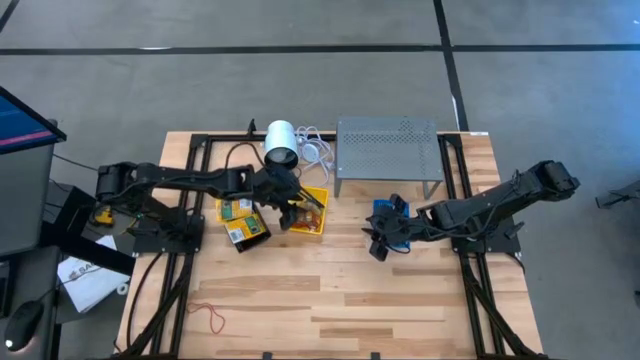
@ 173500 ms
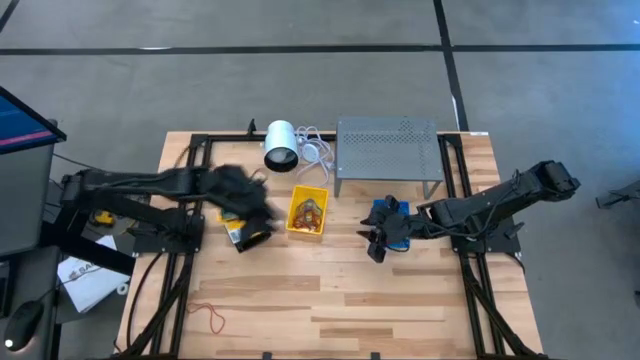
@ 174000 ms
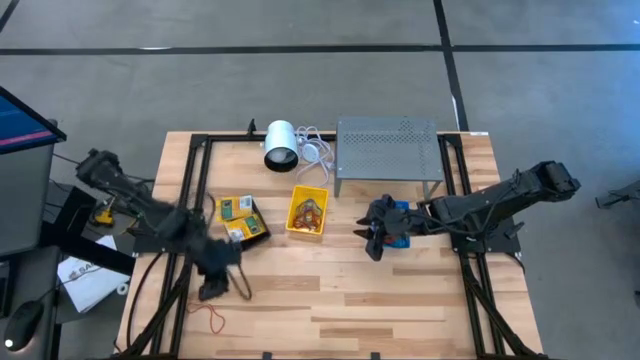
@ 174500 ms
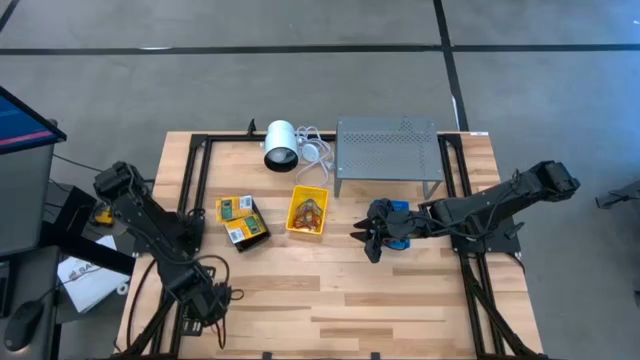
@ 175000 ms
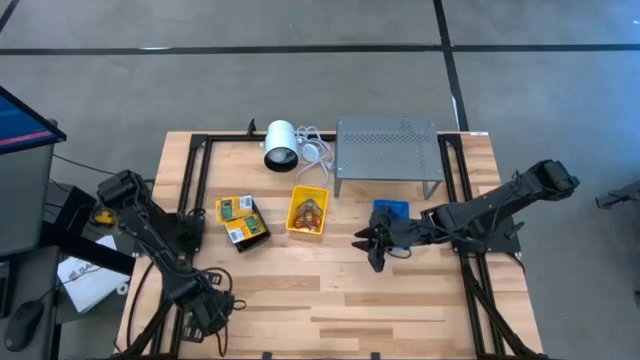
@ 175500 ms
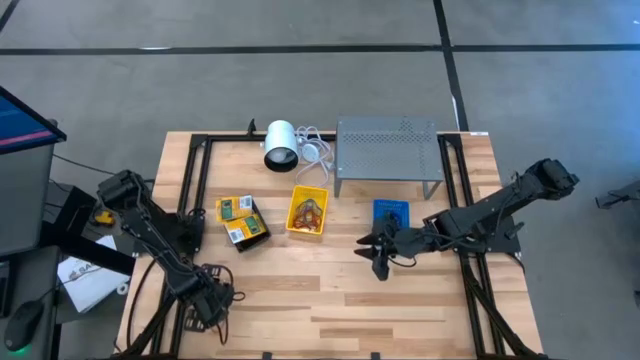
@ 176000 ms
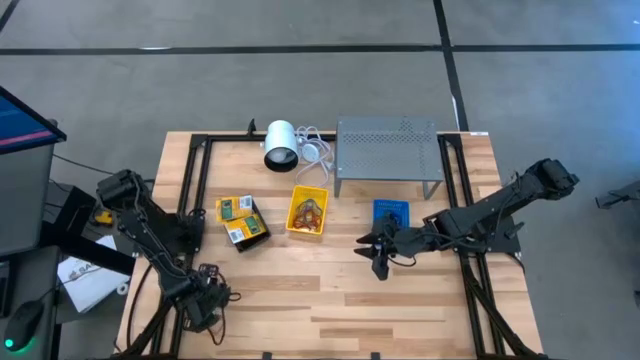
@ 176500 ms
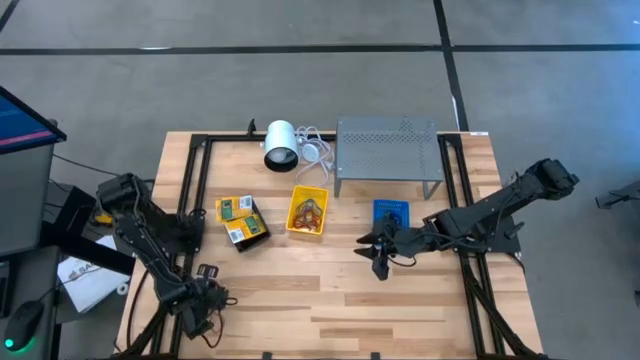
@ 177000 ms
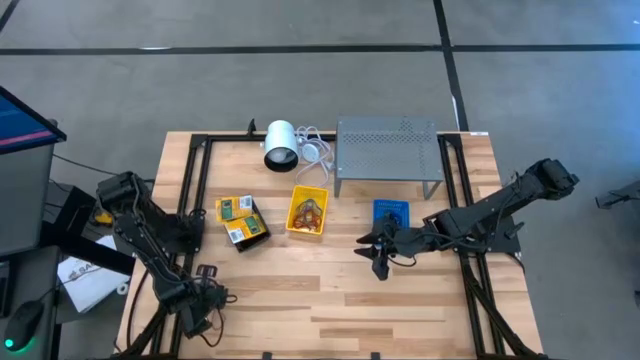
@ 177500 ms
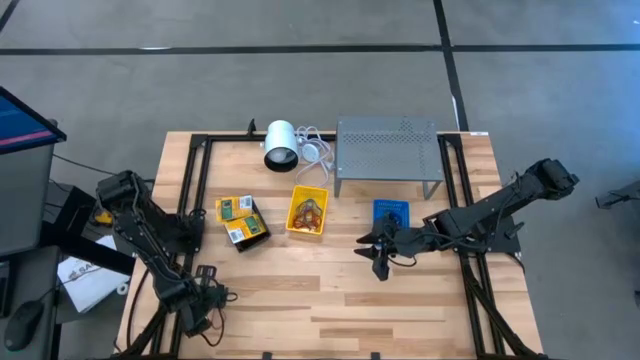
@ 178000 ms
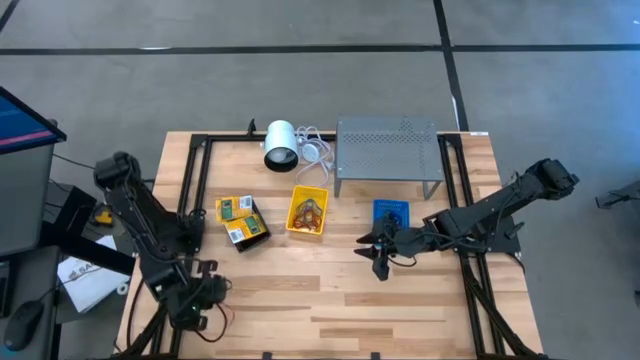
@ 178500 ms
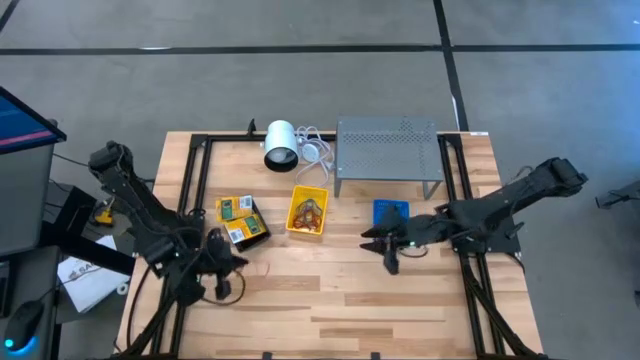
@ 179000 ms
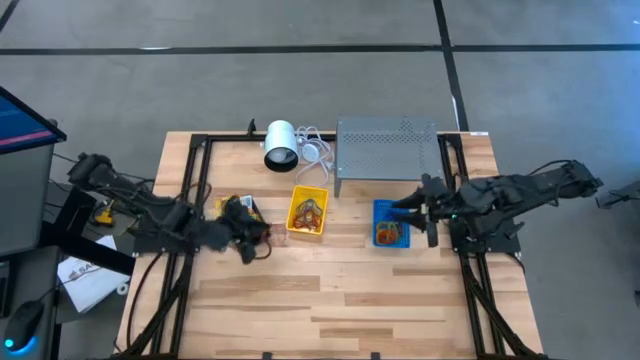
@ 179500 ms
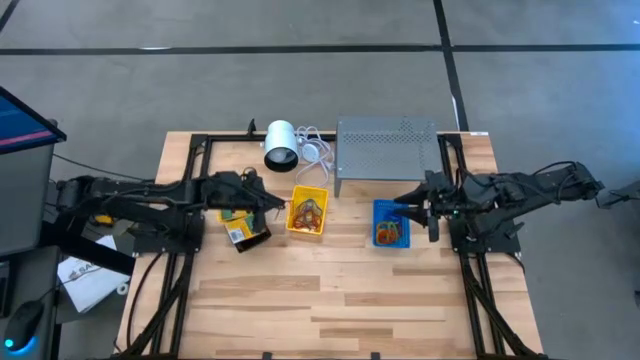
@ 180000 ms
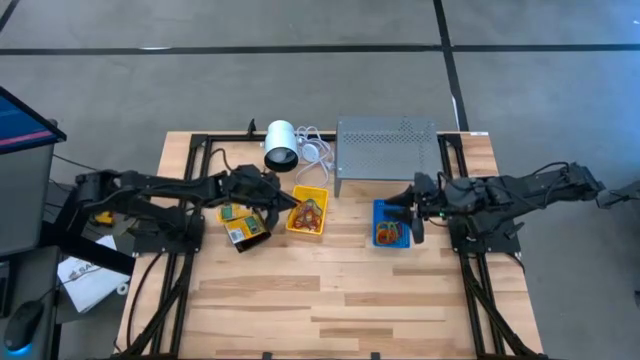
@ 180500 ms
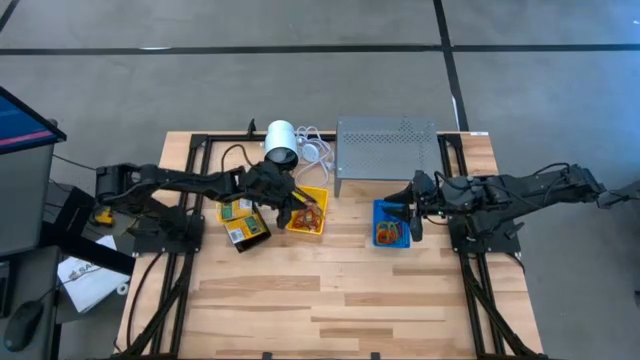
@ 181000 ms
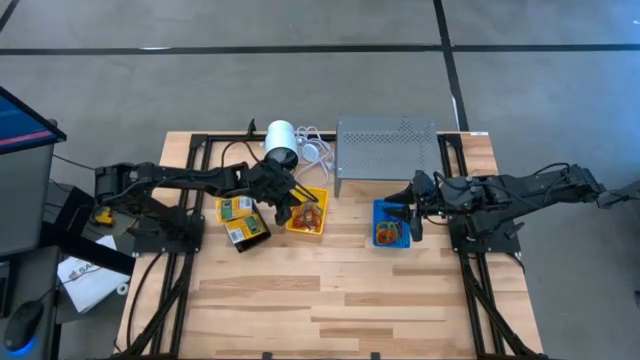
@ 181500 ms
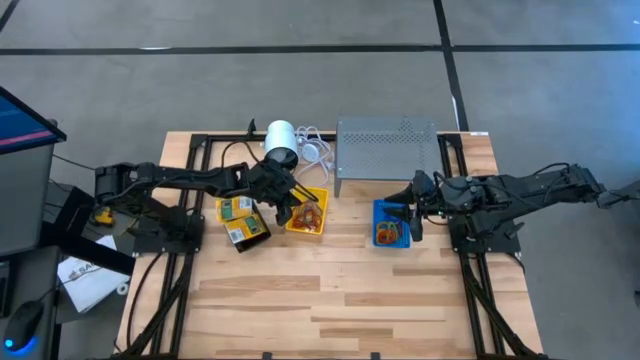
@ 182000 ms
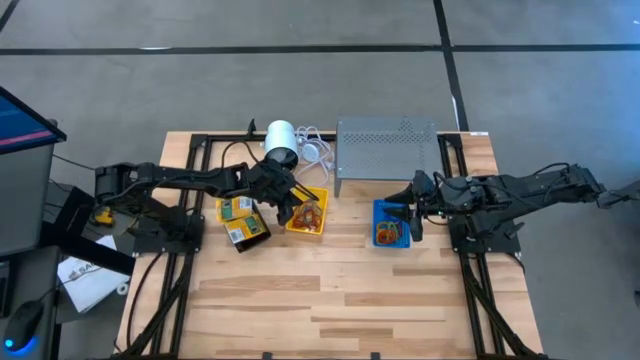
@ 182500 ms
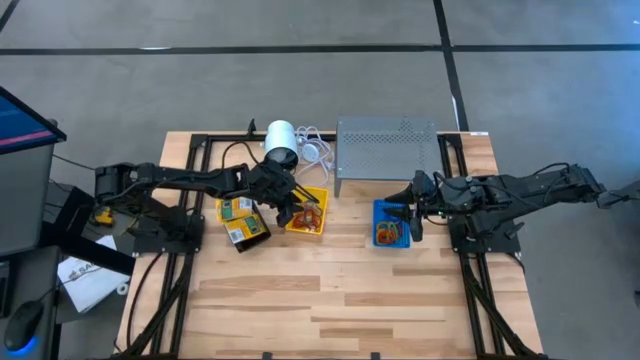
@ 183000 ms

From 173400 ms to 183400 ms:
Task: Pick & Place Office Desk Supplies
Put the red rubber band into the yellow basket

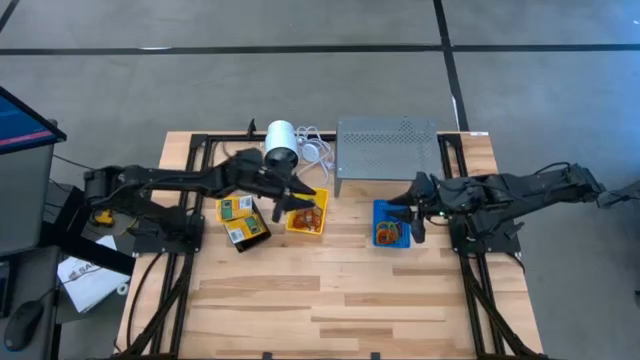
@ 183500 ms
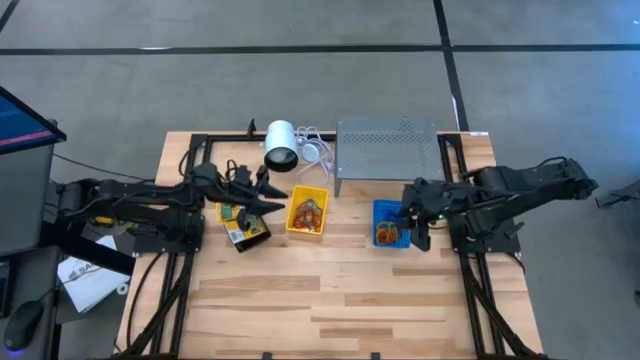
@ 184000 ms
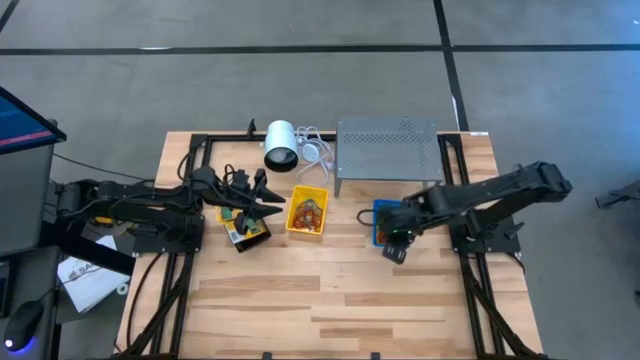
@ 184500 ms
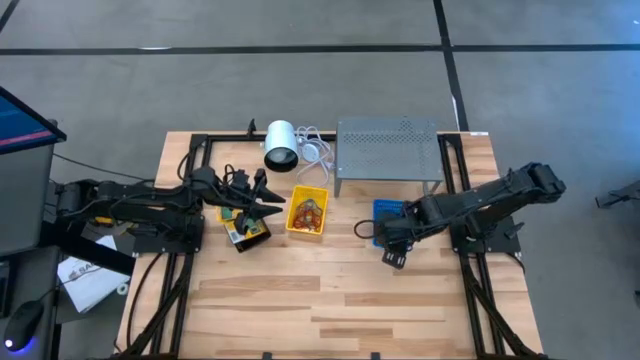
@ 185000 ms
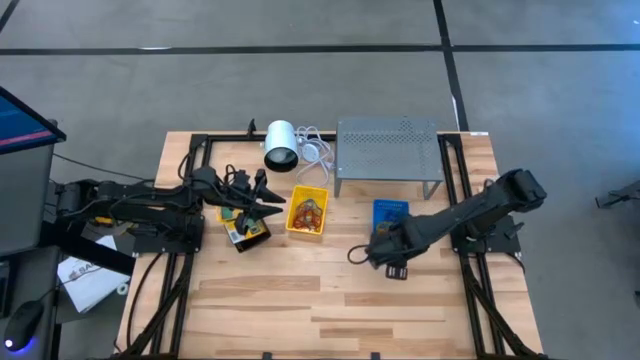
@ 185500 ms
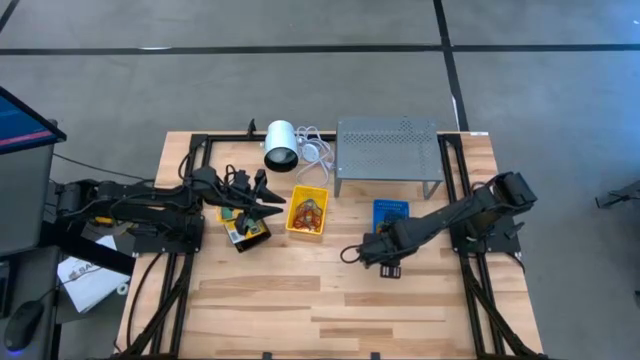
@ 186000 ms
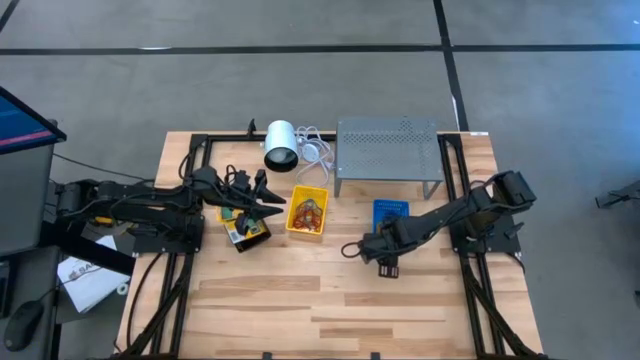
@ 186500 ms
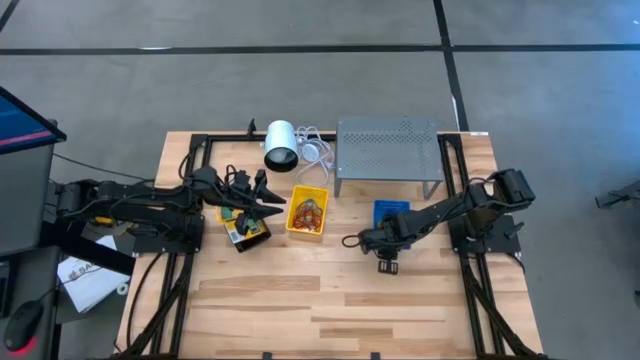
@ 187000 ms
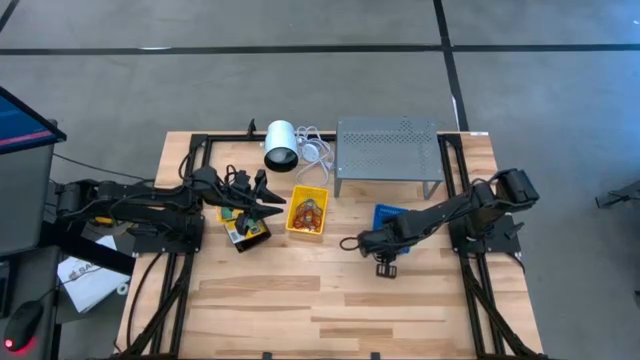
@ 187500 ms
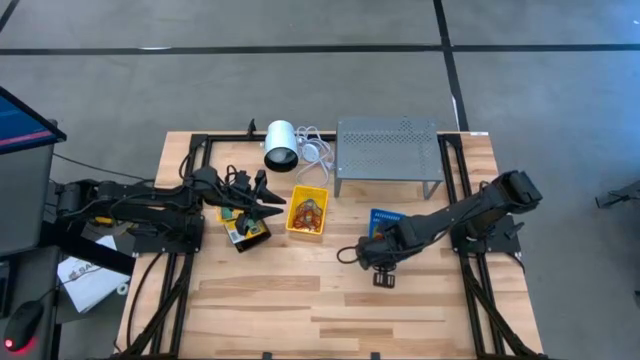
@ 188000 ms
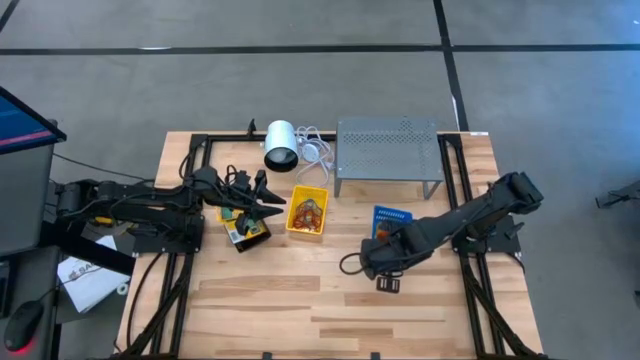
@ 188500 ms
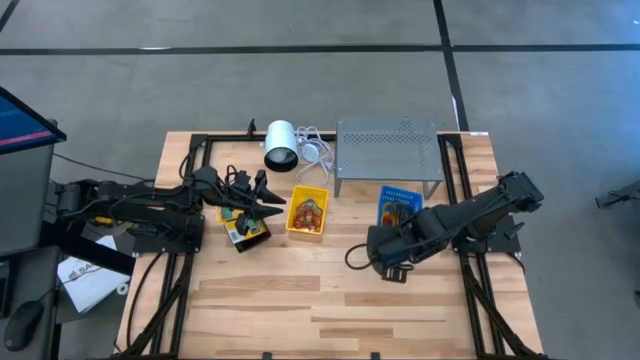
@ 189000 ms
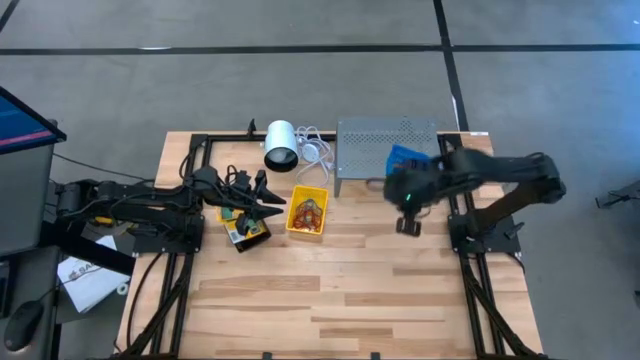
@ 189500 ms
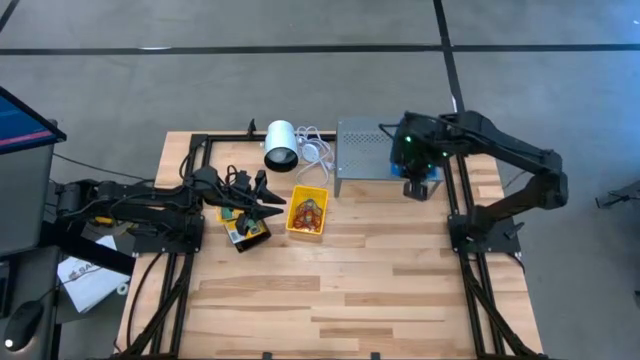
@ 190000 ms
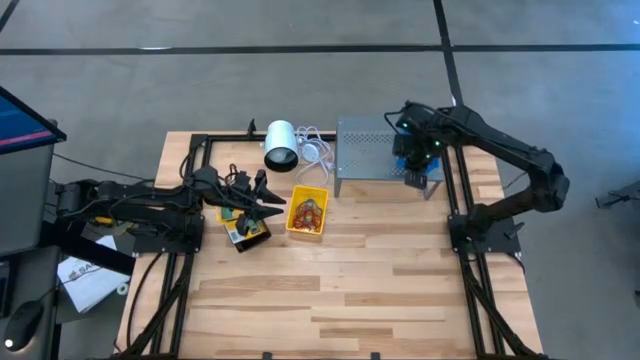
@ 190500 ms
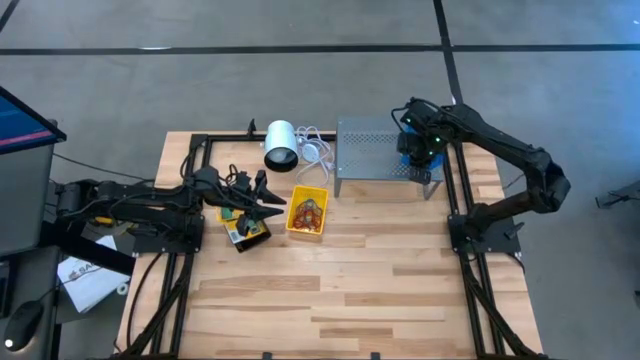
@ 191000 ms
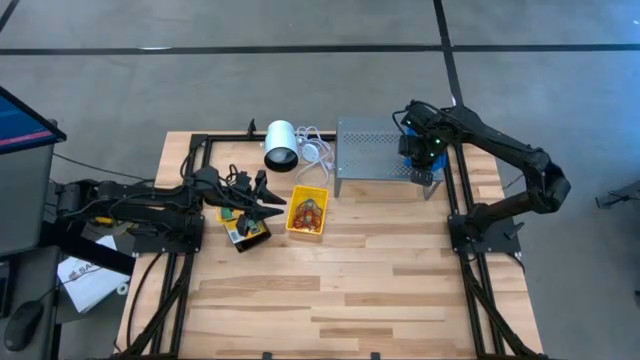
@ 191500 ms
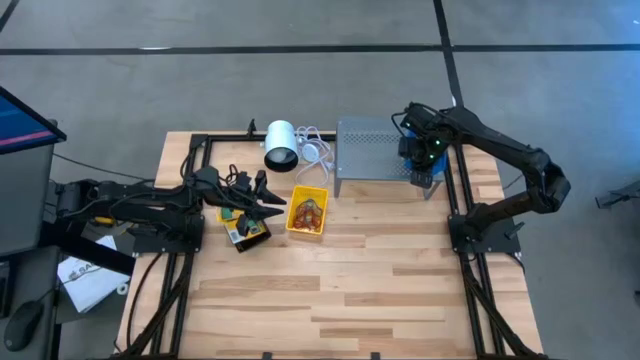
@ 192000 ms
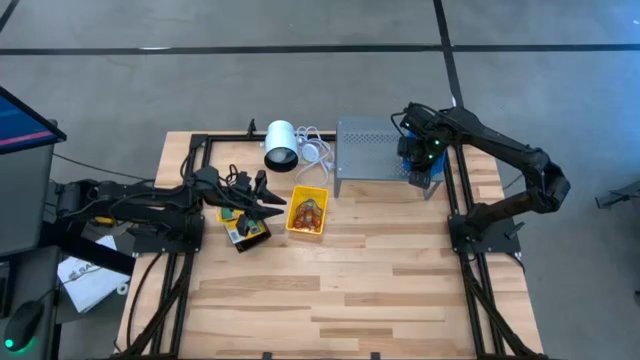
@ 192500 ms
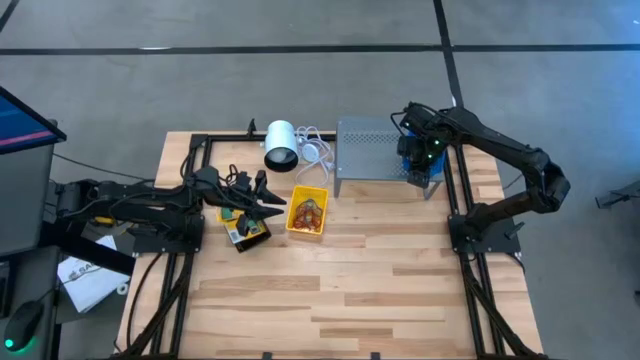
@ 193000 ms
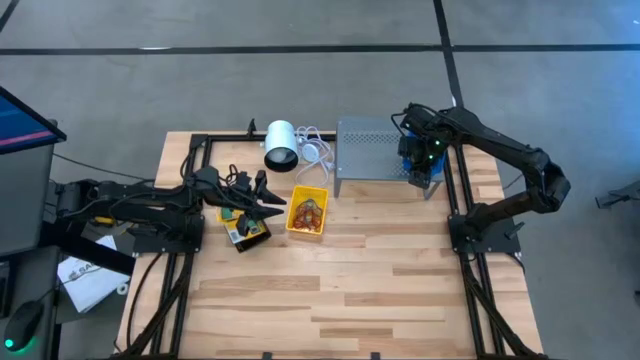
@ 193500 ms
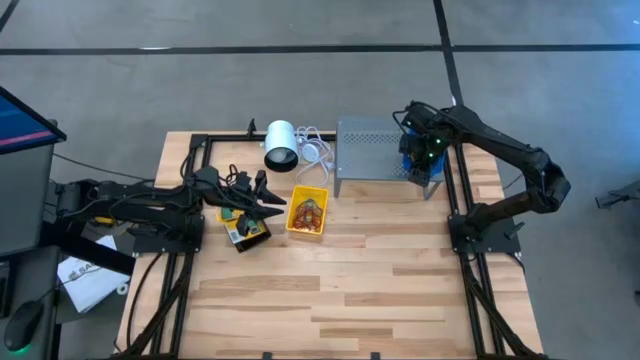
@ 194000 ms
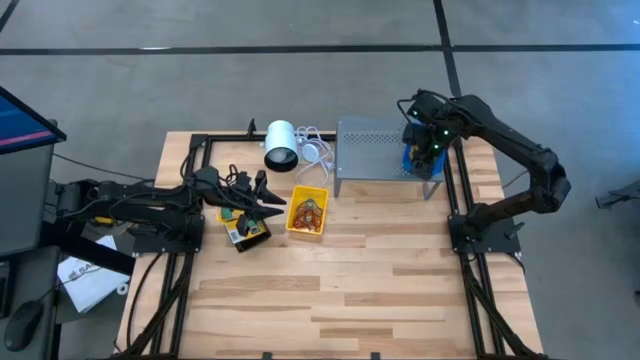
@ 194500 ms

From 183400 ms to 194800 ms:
Put the blue basket filled with elastic key rings on the shelf
